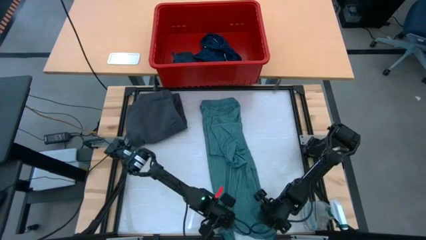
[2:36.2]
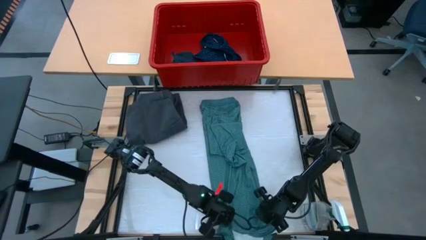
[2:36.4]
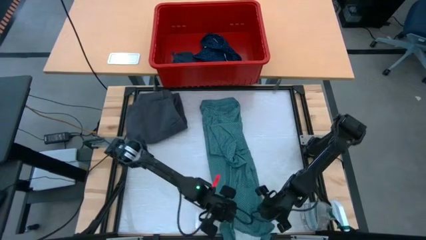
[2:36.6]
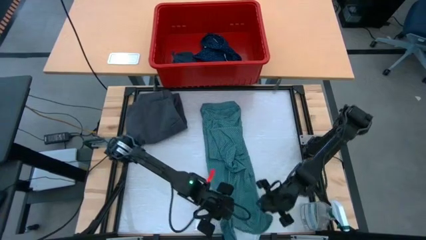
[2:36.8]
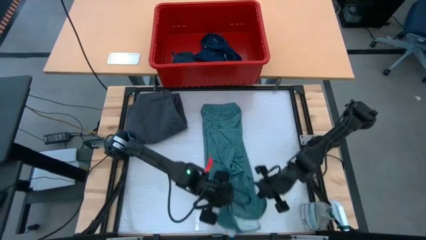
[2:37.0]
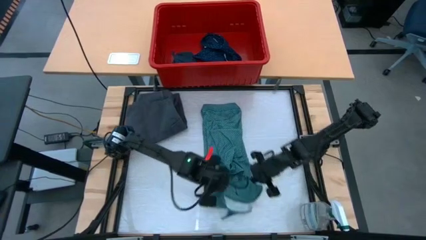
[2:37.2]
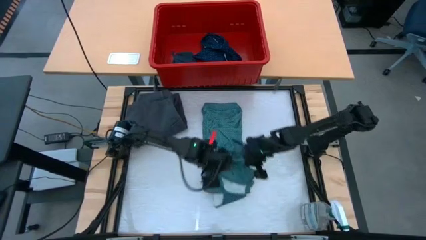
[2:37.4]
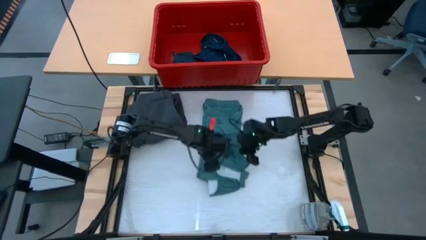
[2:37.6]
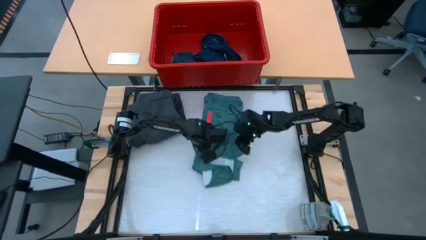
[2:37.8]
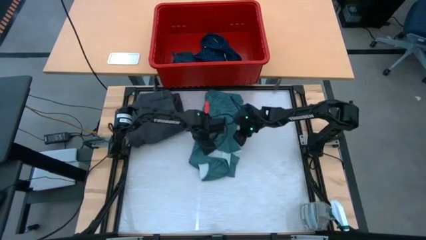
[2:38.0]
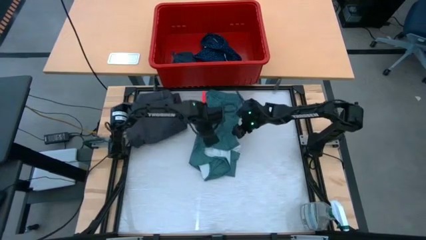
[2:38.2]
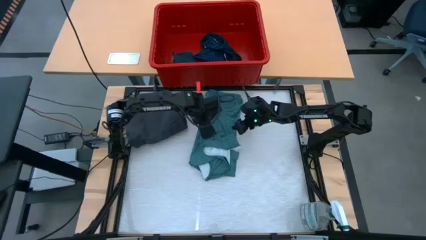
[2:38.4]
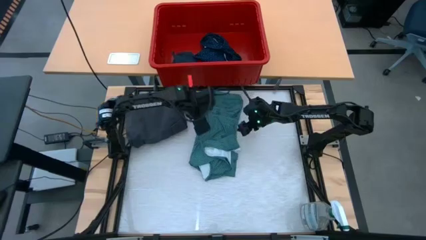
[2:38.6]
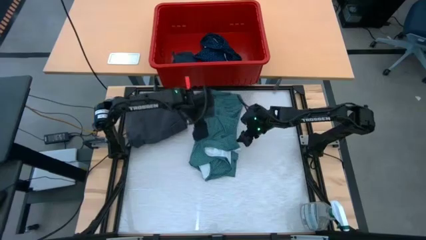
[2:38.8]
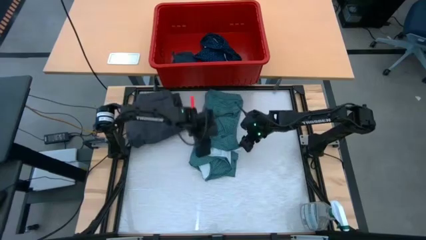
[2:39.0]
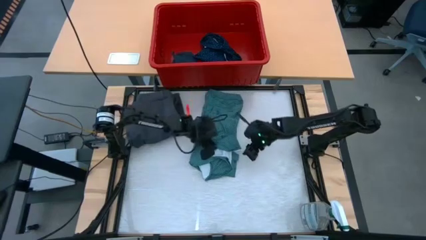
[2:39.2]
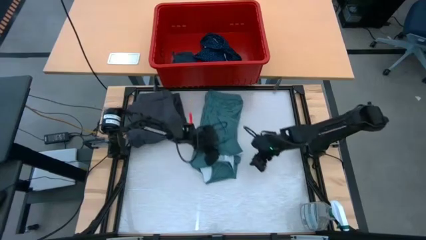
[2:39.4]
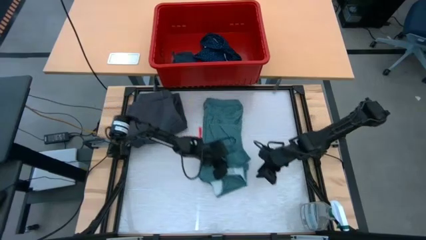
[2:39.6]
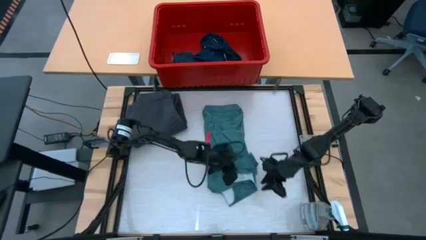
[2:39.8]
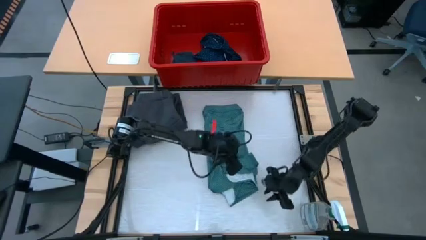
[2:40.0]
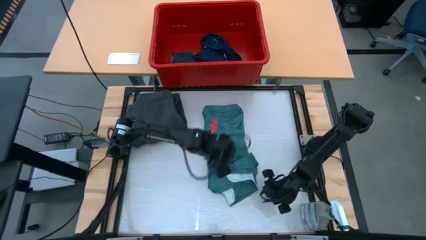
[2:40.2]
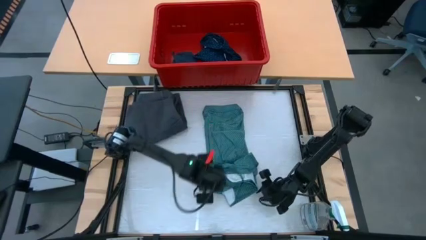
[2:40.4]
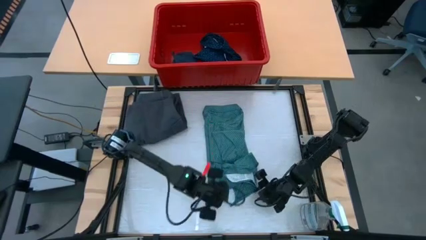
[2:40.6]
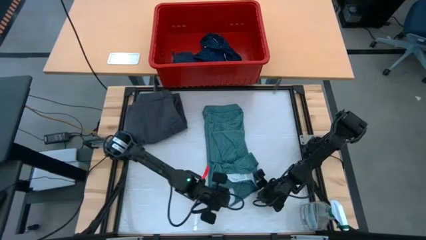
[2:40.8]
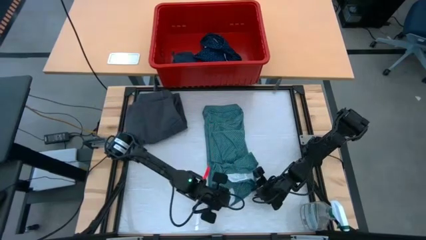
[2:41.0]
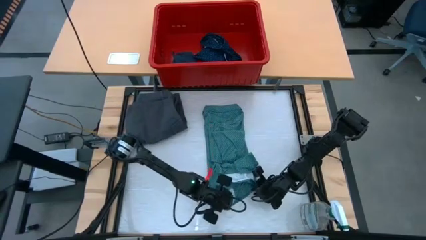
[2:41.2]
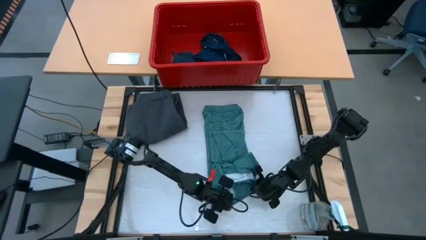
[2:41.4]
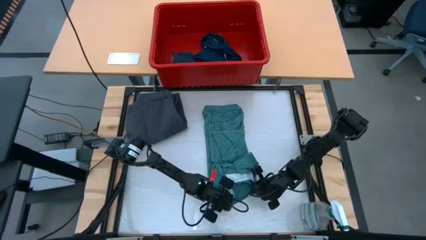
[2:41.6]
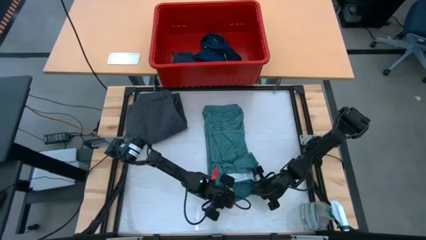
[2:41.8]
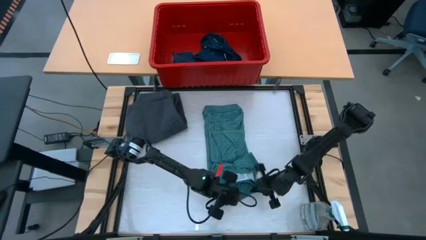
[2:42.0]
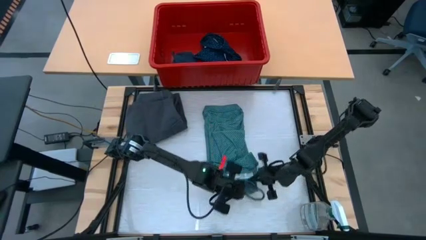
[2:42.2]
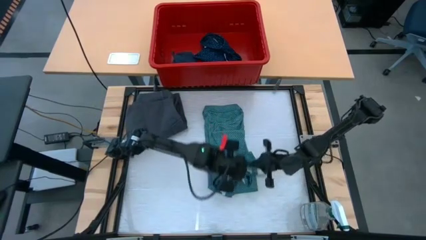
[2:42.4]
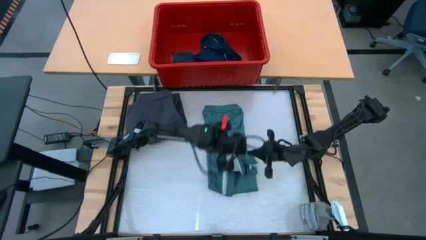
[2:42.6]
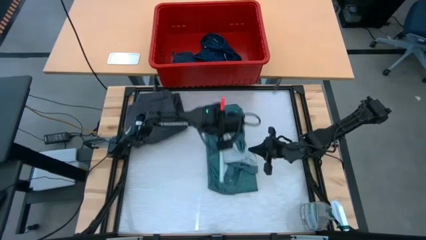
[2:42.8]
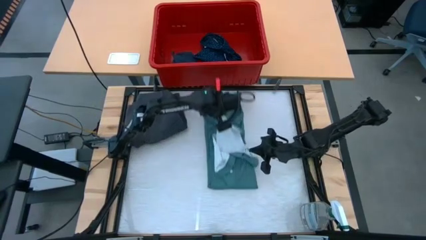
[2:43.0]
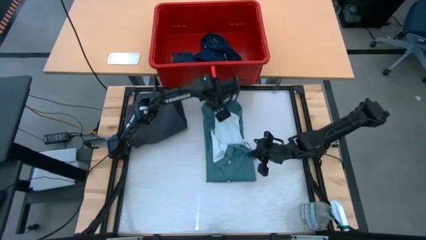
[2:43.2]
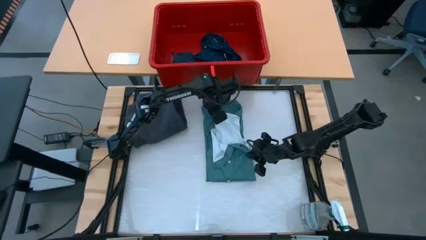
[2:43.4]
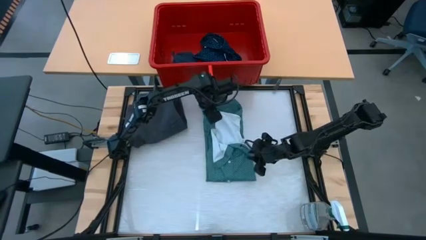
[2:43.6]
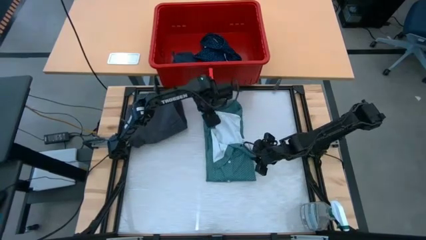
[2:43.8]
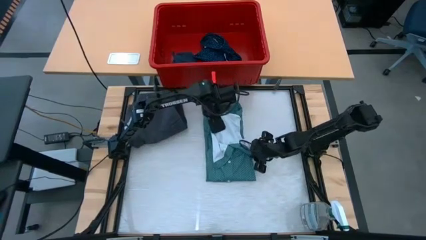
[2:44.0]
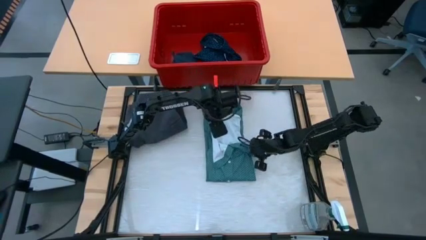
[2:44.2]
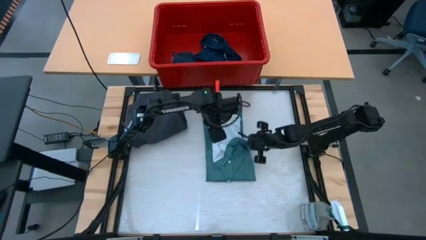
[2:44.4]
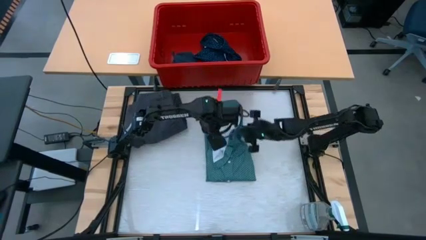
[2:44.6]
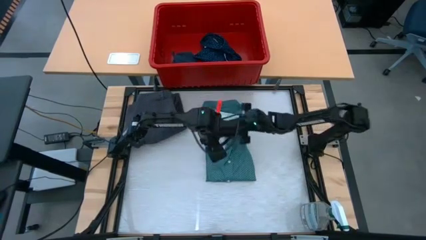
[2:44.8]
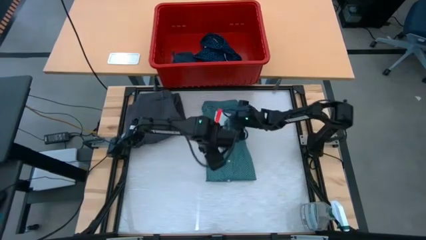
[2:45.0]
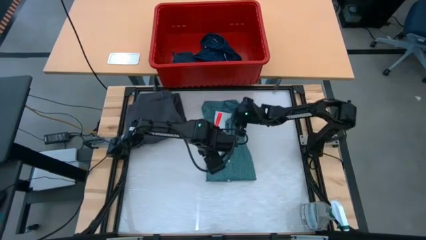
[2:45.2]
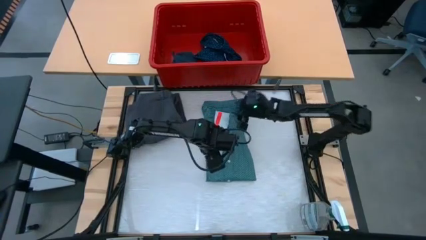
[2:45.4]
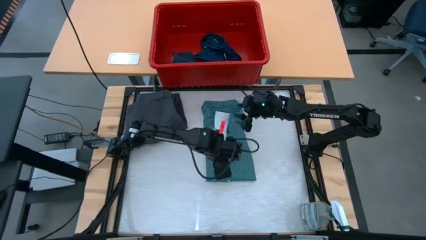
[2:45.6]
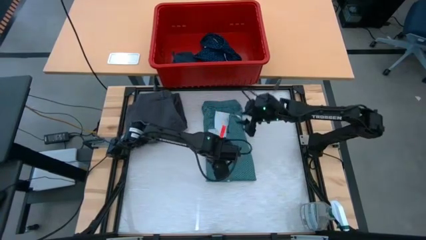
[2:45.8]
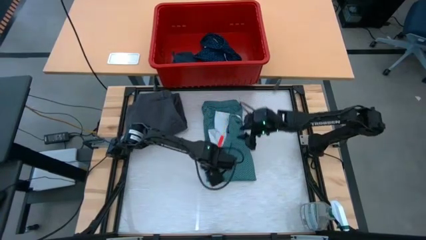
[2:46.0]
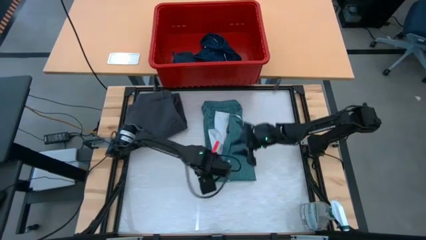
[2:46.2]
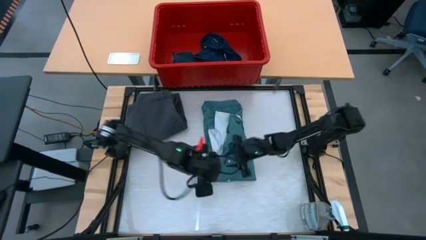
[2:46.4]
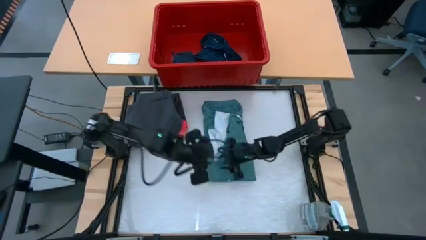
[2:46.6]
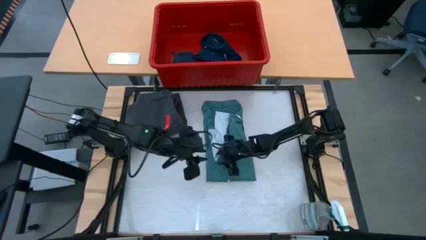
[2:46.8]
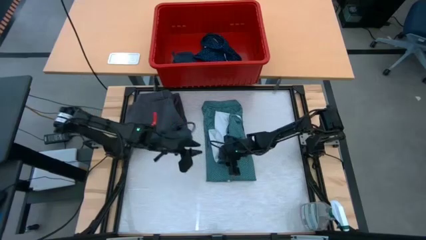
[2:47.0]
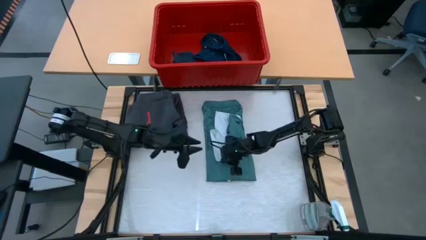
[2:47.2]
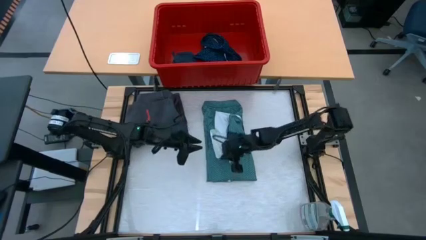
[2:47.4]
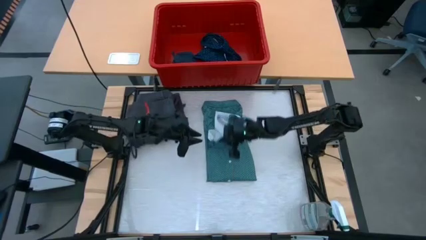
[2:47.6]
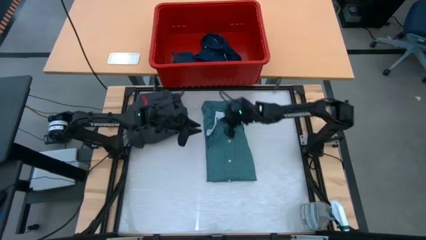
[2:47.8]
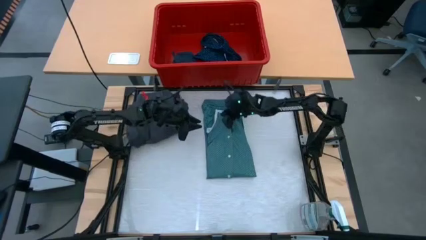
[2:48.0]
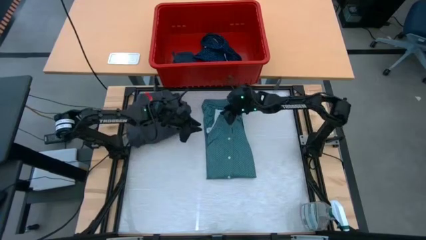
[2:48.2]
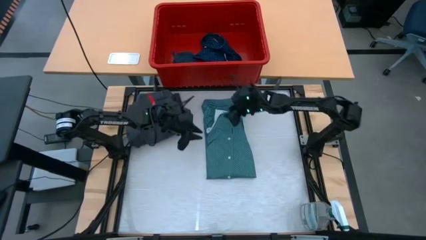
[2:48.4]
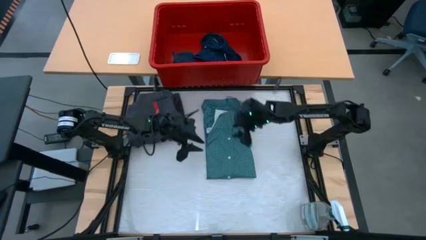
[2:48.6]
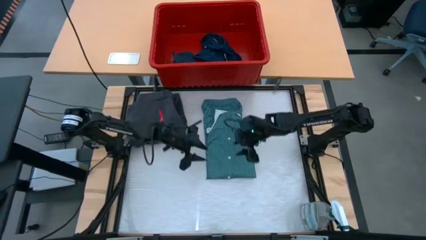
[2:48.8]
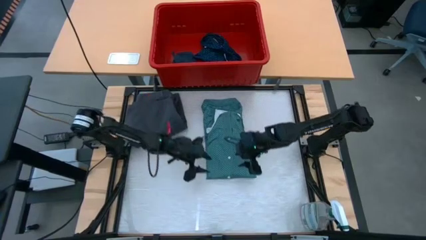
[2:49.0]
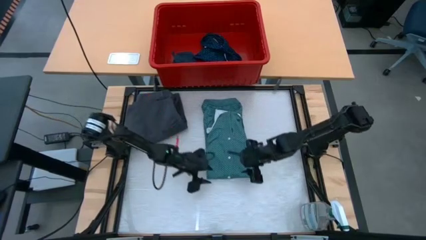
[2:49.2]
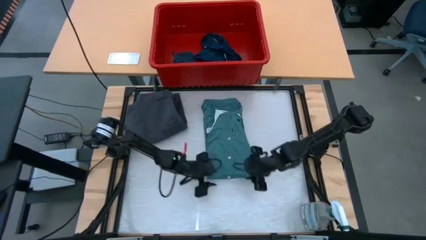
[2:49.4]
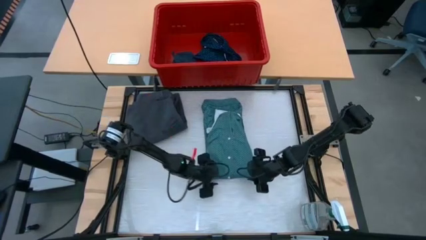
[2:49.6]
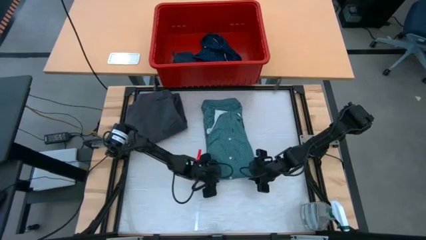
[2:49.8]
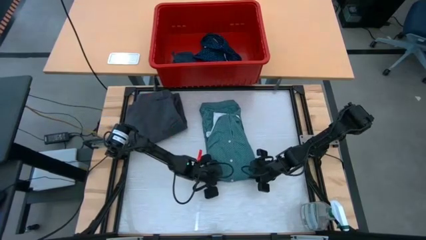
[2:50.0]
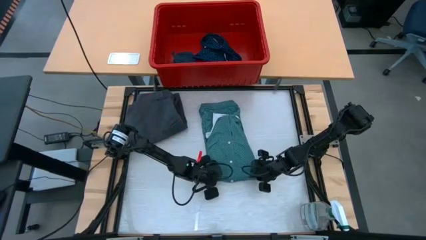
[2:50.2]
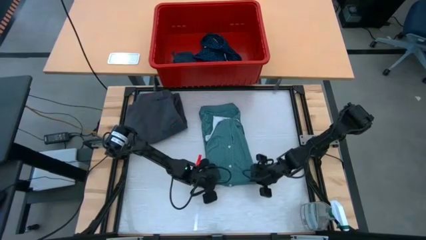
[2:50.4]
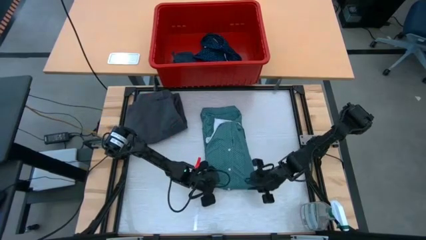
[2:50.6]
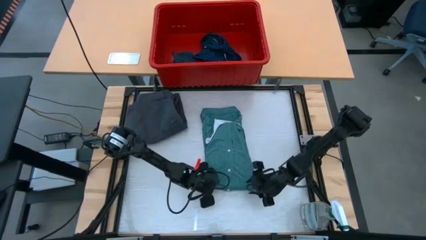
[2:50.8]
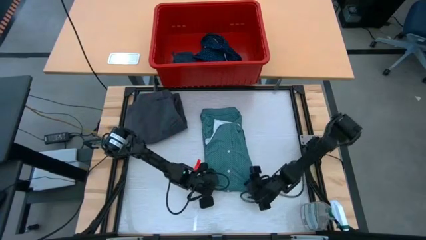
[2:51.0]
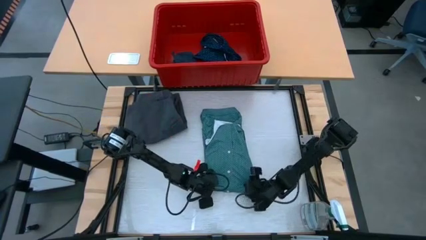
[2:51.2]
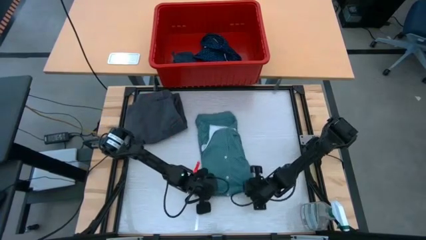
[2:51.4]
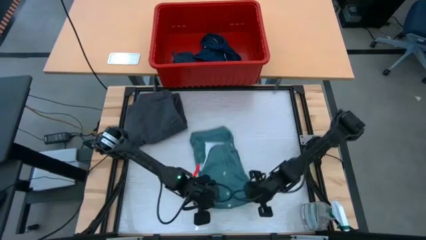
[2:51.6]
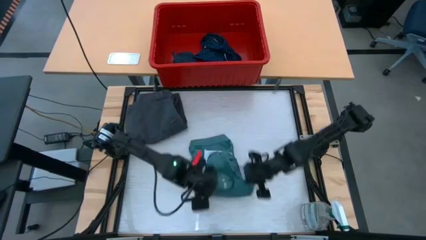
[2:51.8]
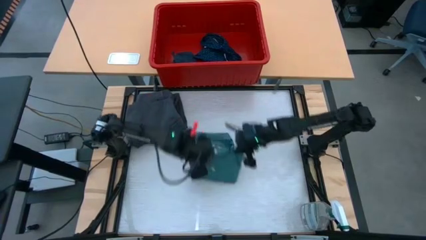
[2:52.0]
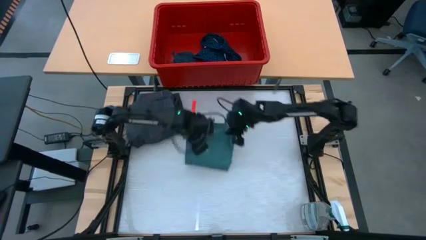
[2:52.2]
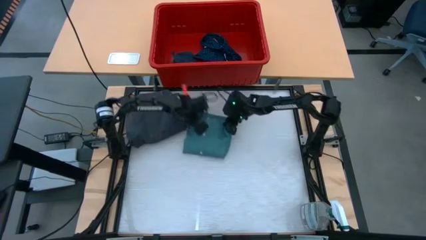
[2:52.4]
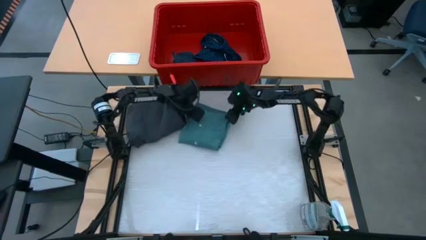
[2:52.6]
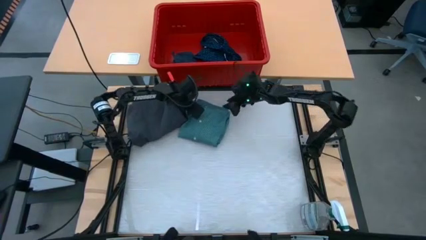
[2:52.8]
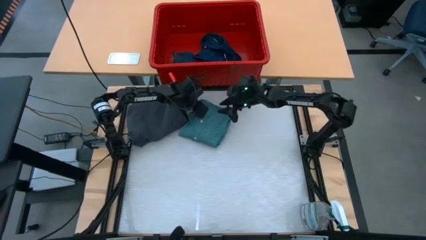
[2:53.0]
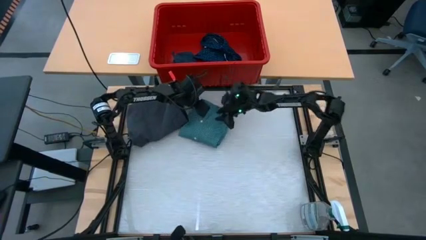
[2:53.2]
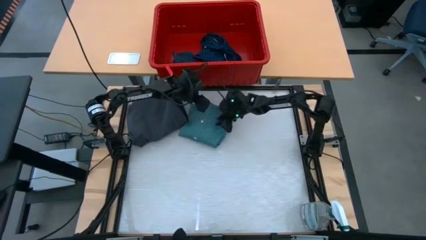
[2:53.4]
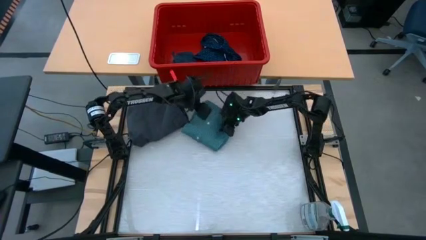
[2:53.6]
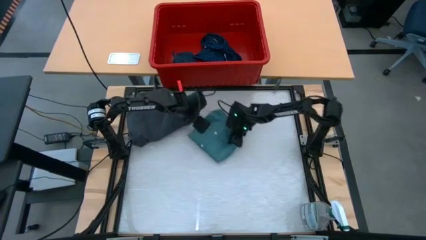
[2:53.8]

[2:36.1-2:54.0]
Task: Fold laundry
Fold the dark green polo

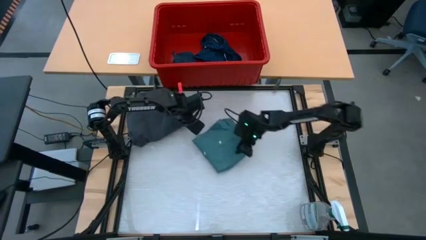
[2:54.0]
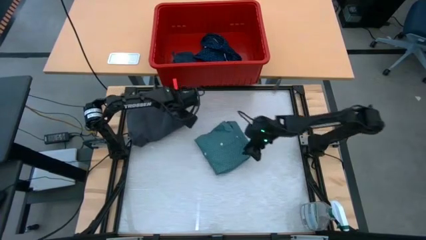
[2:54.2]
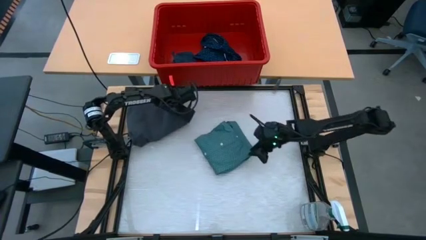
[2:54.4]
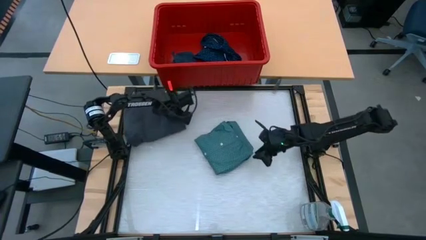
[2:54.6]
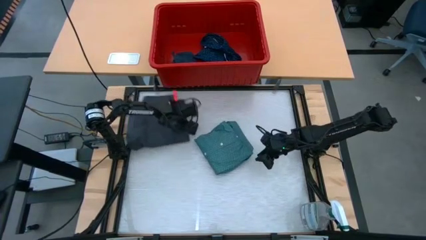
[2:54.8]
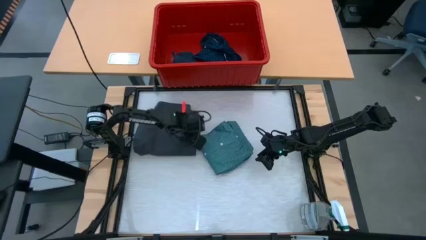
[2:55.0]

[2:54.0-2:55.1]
Adjust the black shorts
